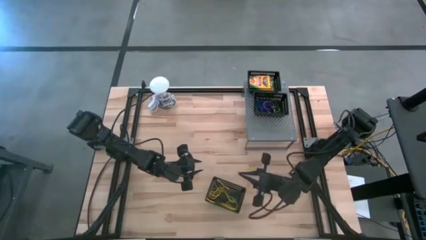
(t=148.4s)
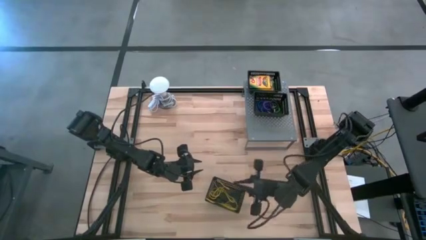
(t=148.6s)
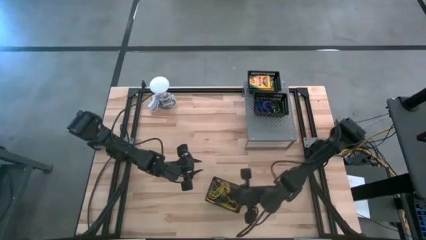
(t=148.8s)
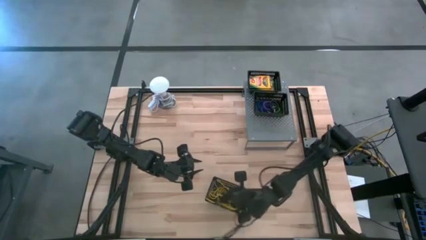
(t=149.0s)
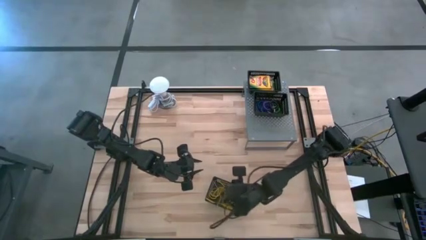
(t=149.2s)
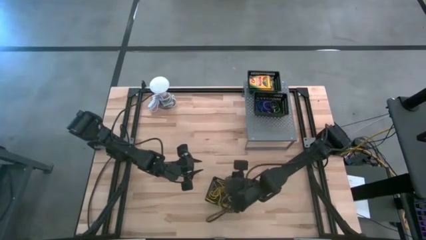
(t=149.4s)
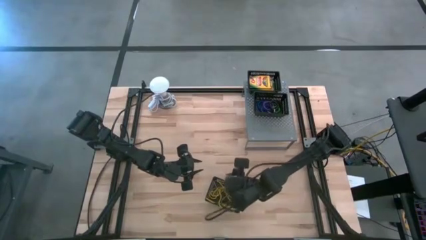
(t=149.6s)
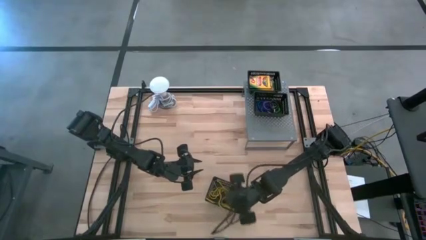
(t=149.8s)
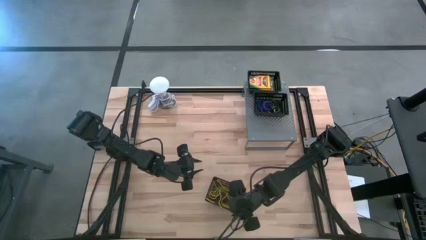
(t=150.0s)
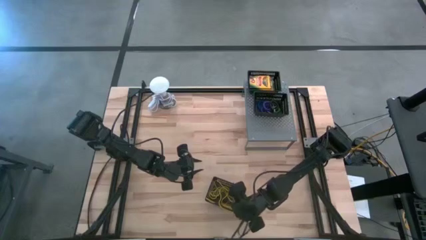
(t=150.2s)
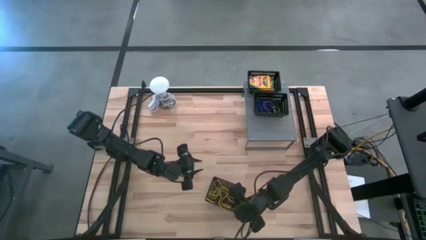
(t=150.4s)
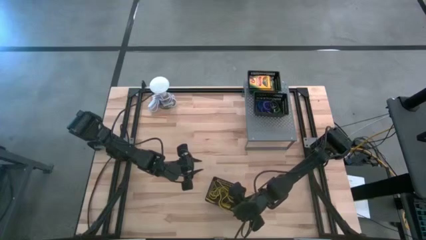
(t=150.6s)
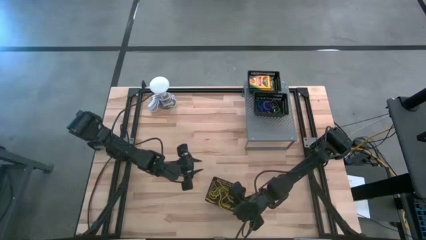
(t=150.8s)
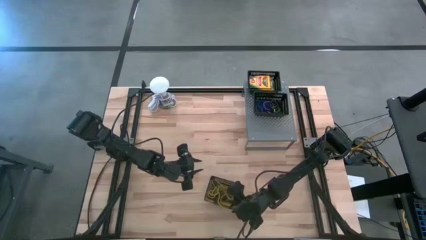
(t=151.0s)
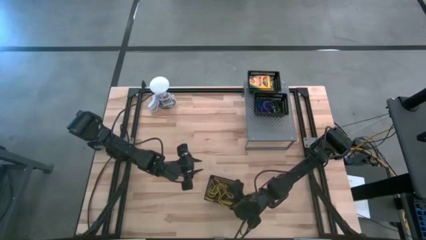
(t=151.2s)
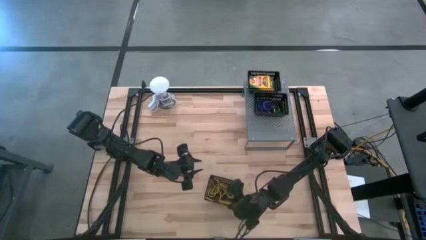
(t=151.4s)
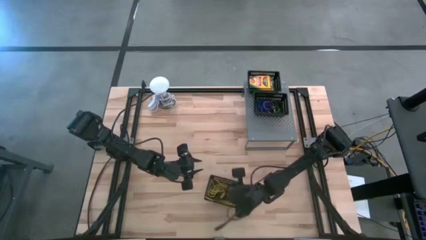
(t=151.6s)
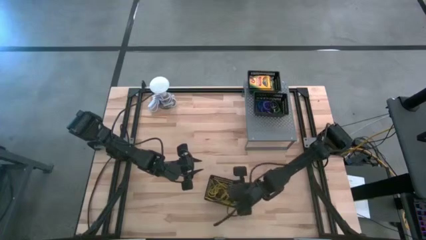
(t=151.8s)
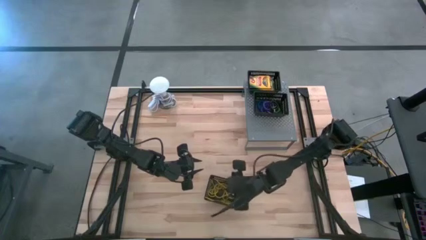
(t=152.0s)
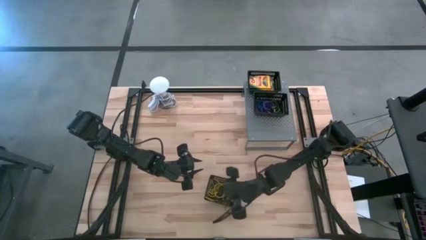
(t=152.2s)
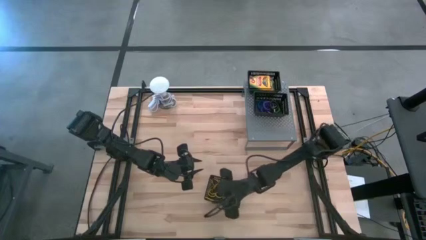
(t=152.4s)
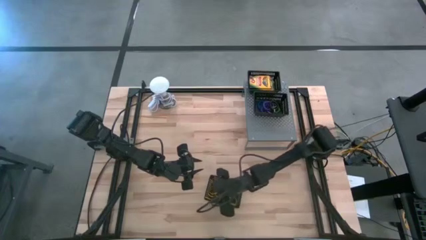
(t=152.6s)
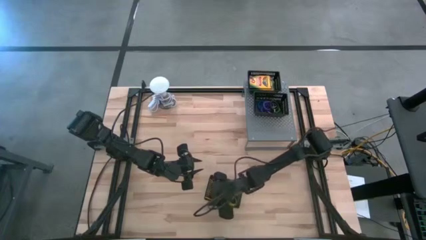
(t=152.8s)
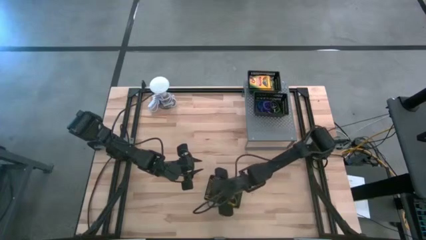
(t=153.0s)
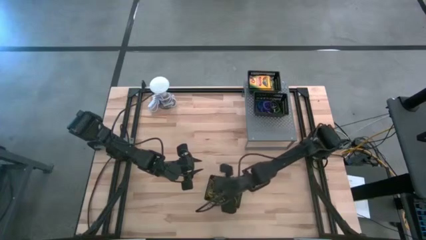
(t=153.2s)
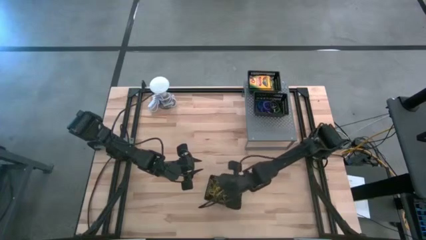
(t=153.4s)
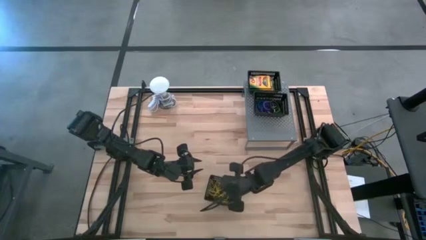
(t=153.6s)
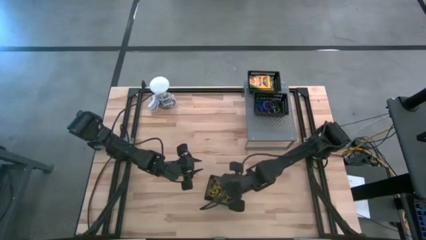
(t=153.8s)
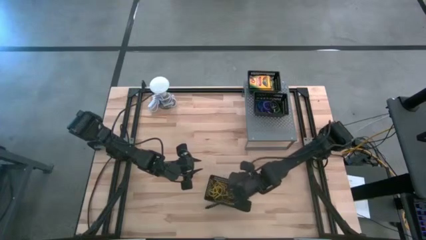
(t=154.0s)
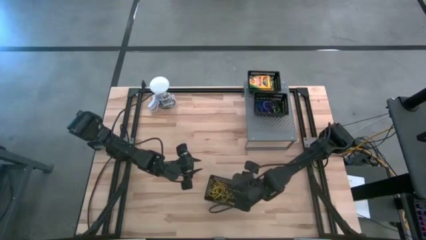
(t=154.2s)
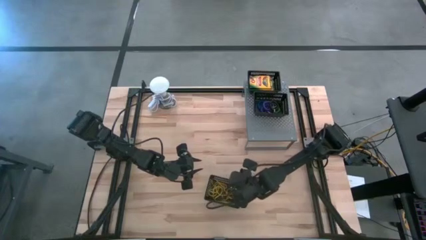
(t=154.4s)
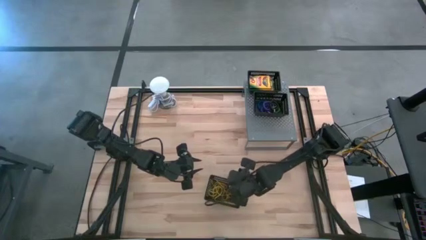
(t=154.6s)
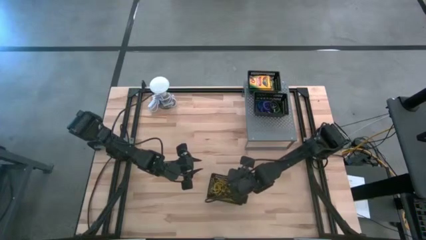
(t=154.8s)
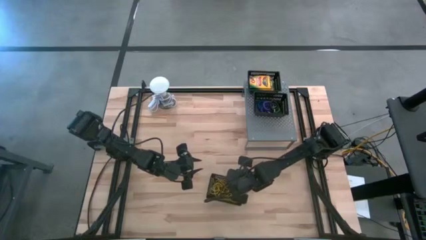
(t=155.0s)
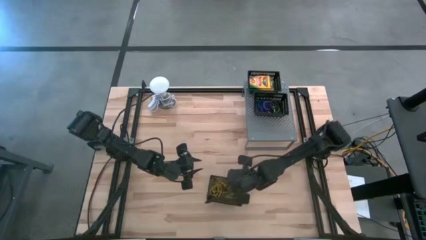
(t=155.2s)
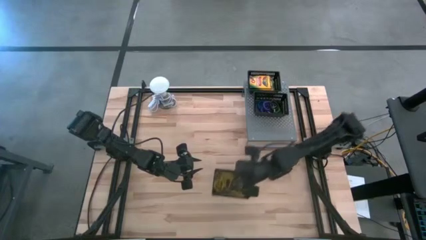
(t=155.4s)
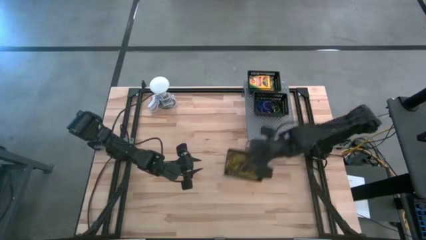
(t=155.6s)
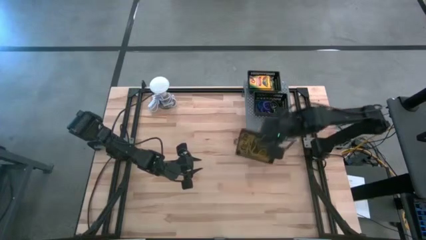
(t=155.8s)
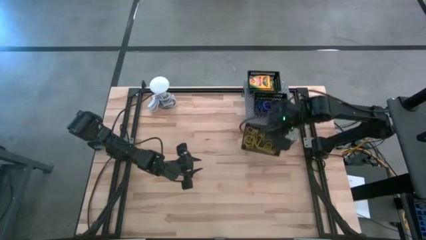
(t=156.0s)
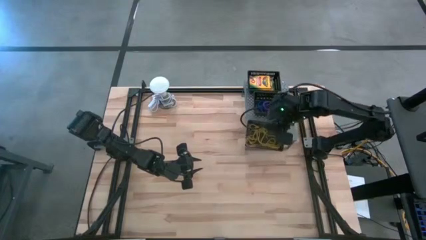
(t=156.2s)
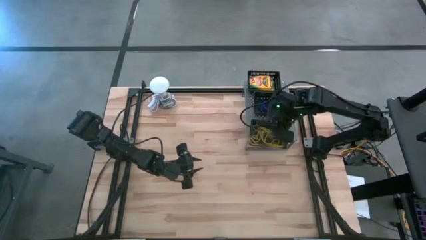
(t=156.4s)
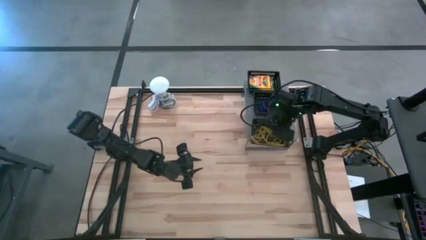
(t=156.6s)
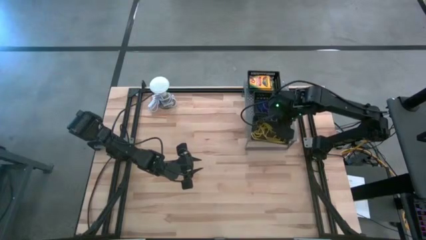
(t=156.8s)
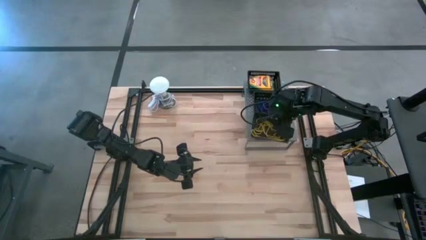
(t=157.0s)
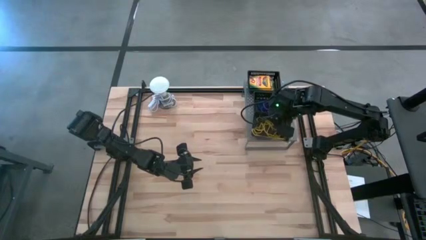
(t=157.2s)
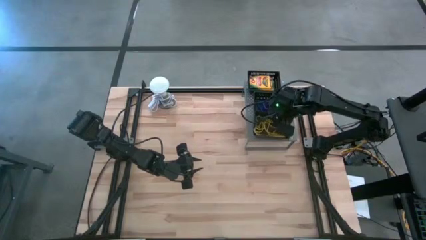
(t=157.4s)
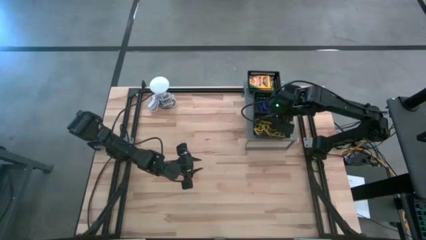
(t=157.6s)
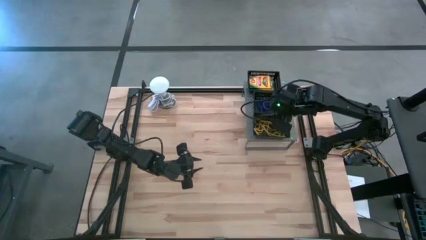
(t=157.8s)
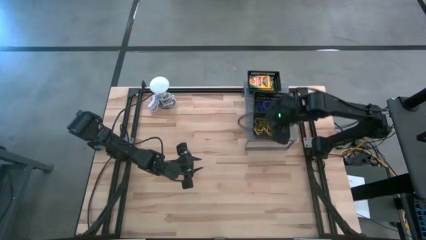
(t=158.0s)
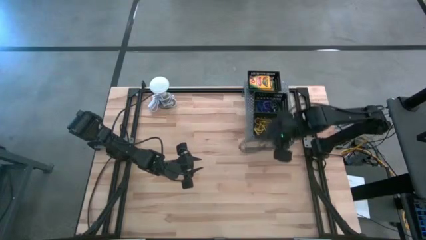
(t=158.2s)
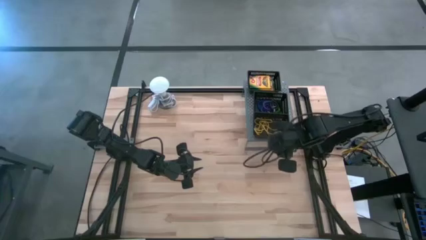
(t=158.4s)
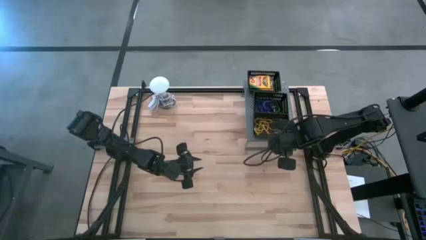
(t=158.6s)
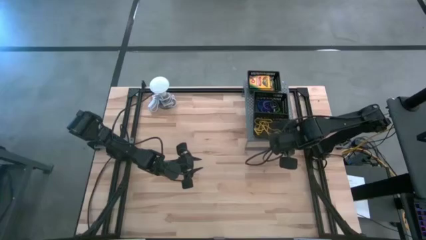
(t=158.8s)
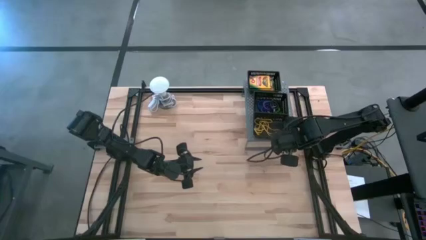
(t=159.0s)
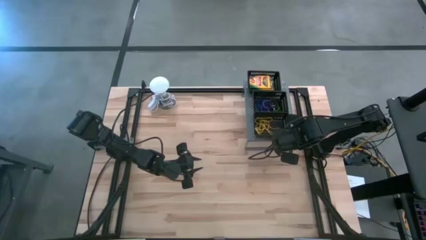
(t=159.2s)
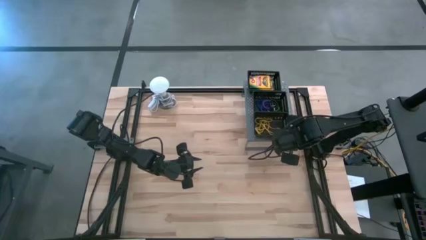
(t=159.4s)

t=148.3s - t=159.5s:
Task: Pick & Place Office Desk Supplies
Adjust the black bin on the shelf

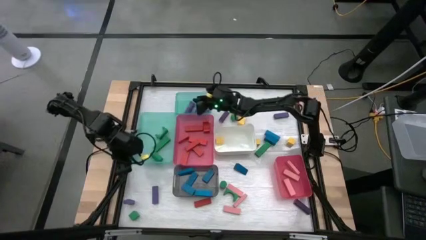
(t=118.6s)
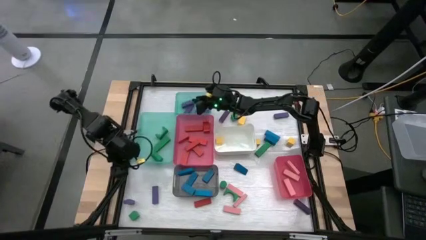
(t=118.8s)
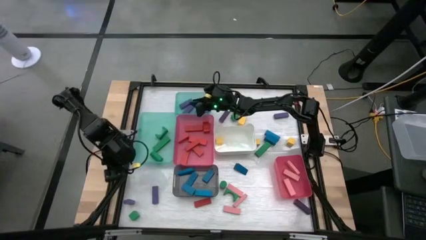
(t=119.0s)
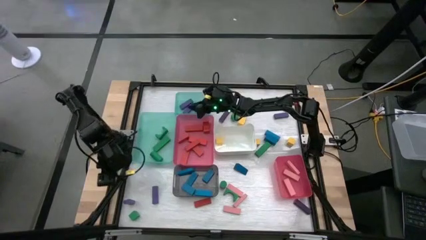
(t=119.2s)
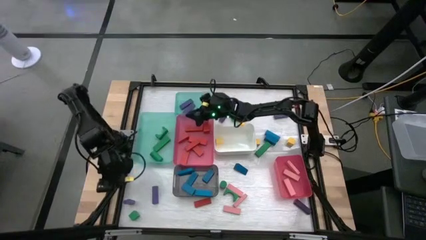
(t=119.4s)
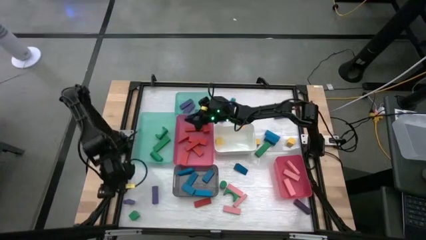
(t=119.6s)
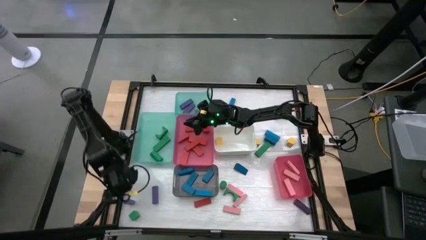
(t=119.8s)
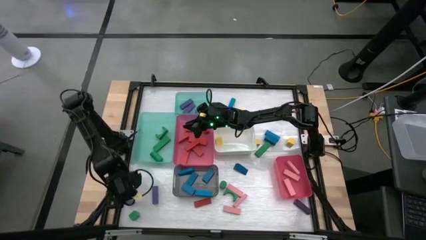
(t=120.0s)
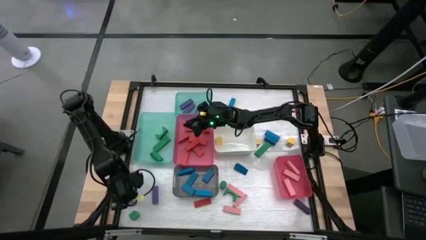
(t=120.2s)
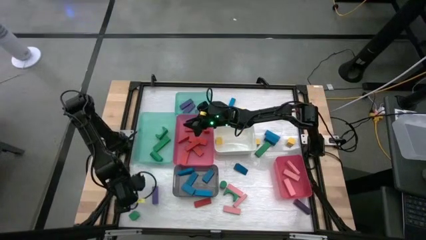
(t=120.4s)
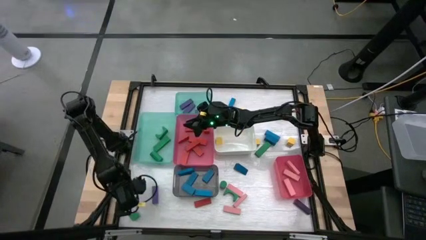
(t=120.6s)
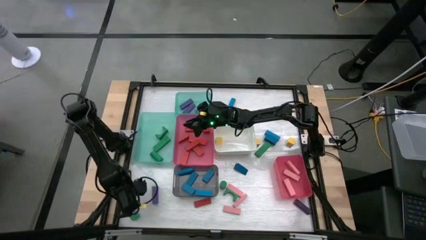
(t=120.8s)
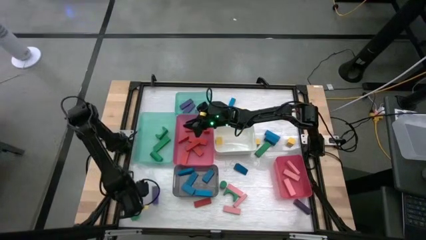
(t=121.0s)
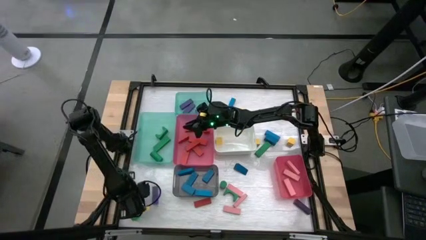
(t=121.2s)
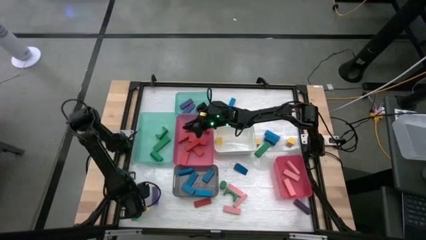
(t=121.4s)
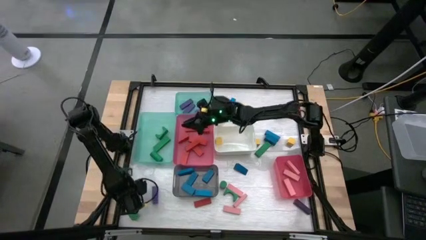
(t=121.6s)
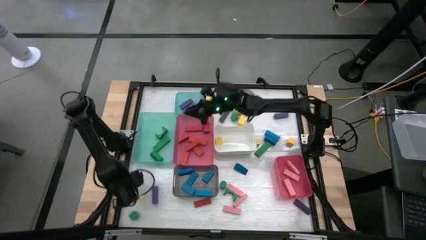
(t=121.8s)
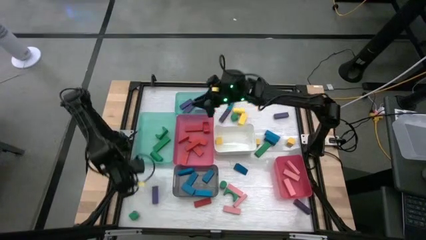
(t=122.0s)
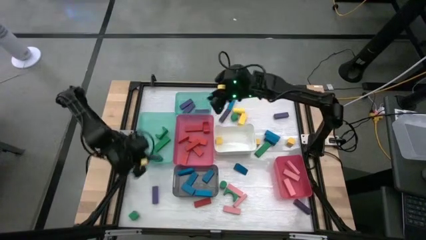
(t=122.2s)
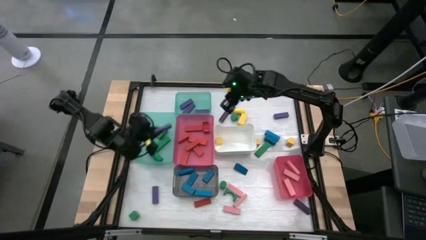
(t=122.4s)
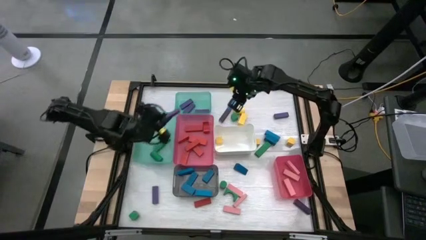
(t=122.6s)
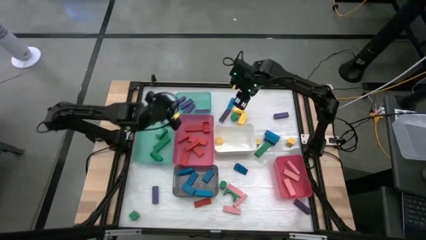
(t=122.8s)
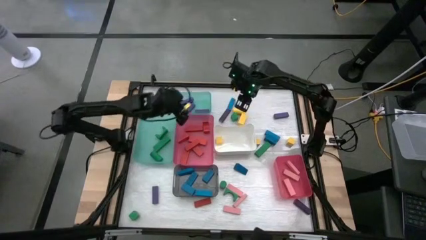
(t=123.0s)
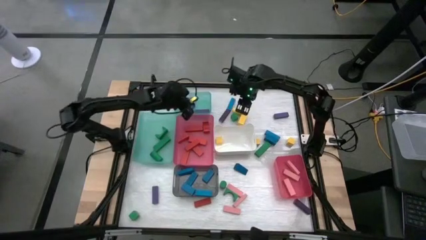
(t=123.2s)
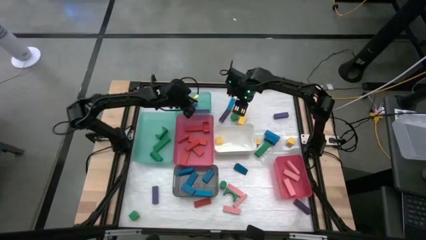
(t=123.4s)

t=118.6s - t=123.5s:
Task: Sort blocks
Put the violet block into the top green bin

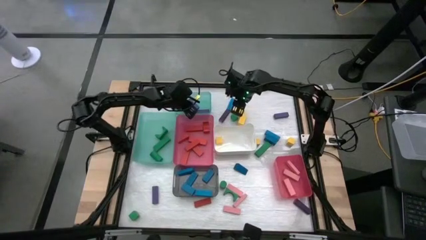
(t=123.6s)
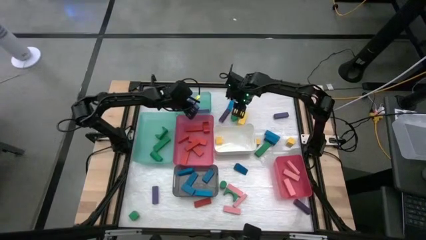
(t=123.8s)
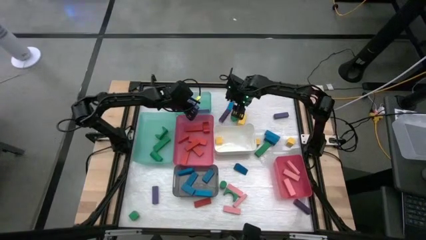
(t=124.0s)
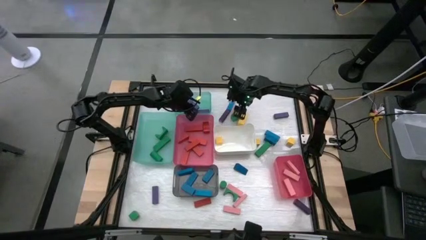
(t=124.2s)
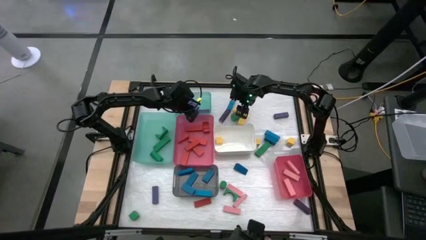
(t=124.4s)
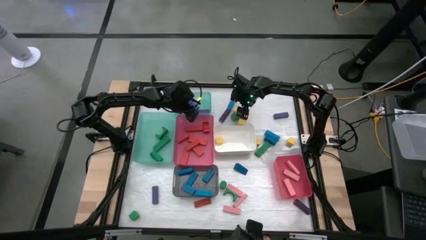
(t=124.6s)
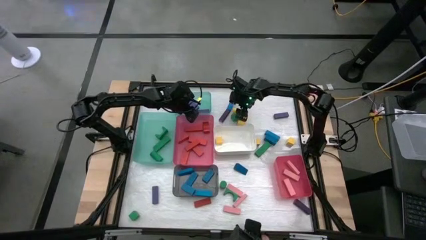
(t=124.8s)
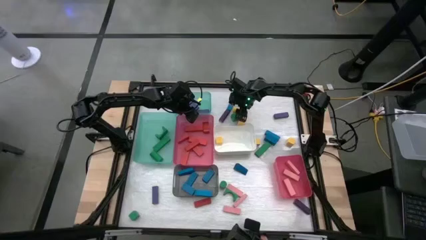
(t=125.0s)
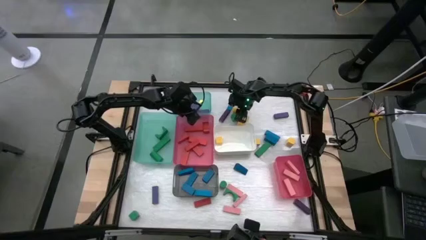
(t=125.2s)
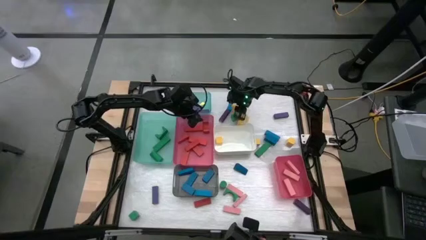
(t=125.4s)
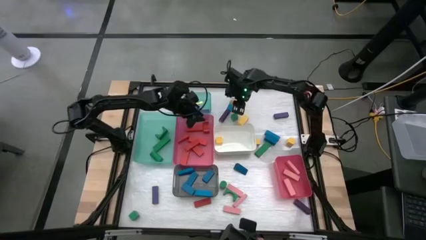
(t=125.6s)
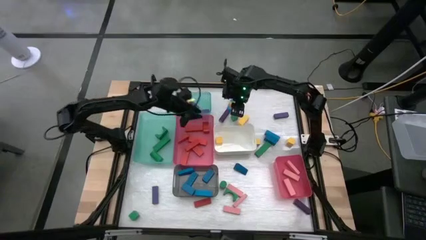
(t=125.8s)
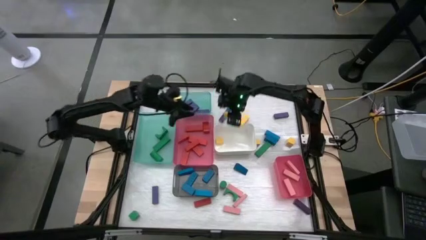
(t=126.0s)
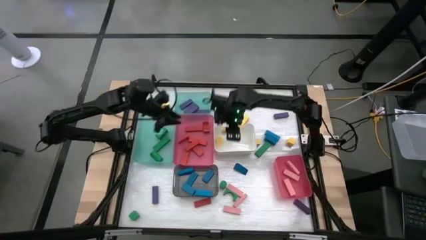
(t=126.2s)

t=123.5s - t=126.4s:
Put the yellow block into the white bin
